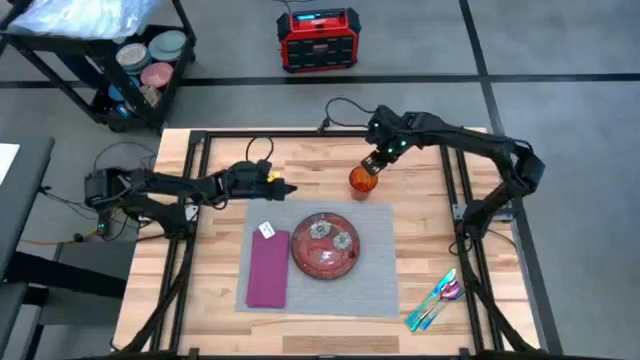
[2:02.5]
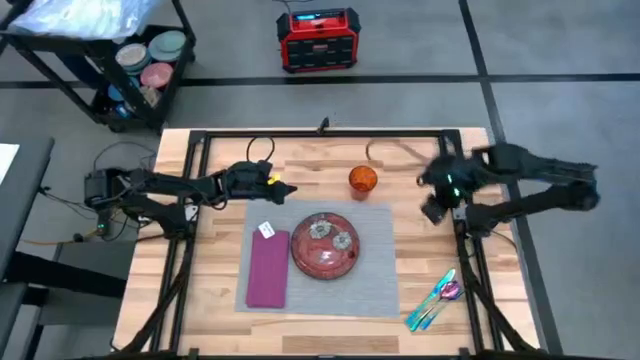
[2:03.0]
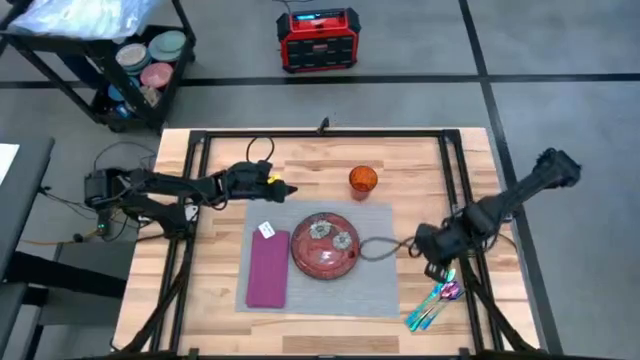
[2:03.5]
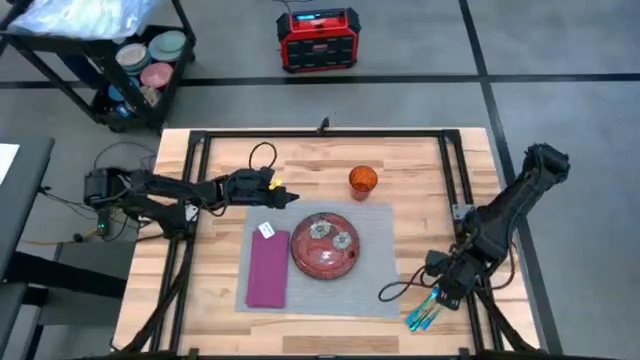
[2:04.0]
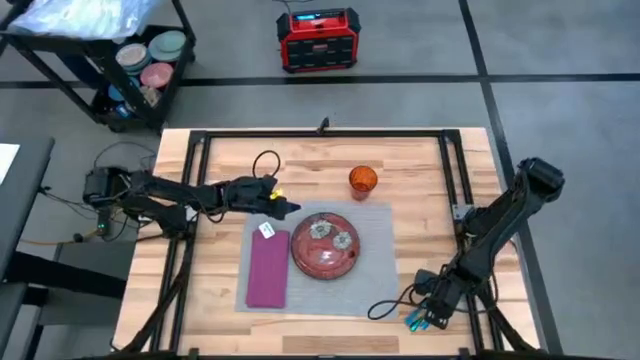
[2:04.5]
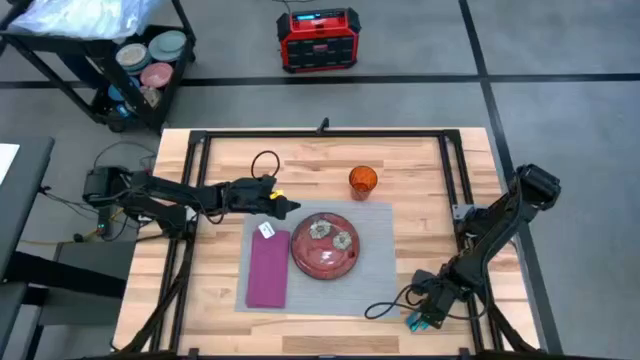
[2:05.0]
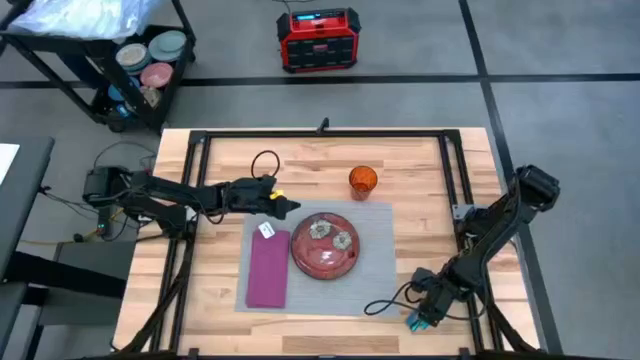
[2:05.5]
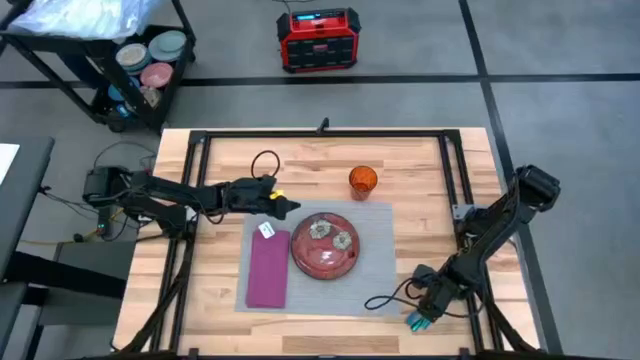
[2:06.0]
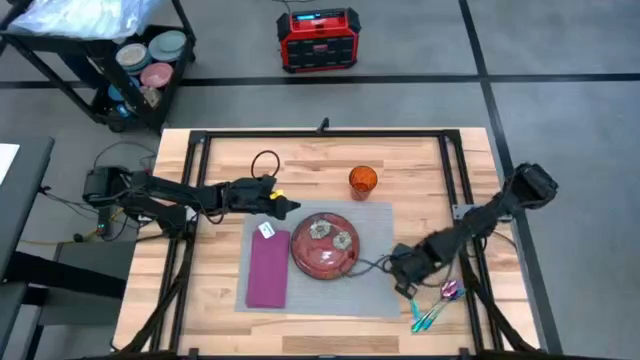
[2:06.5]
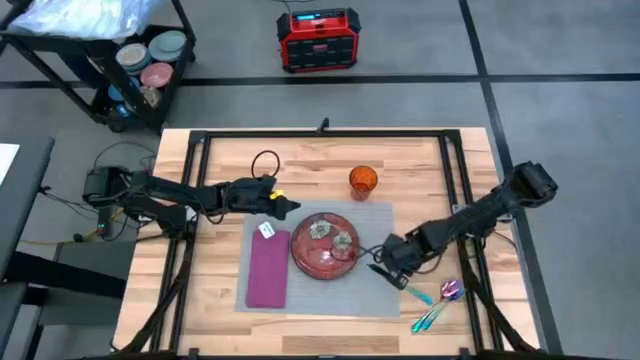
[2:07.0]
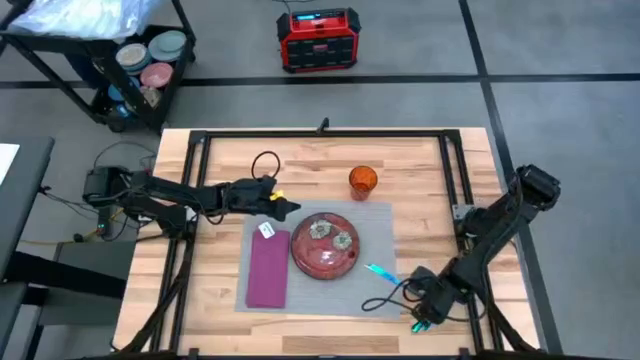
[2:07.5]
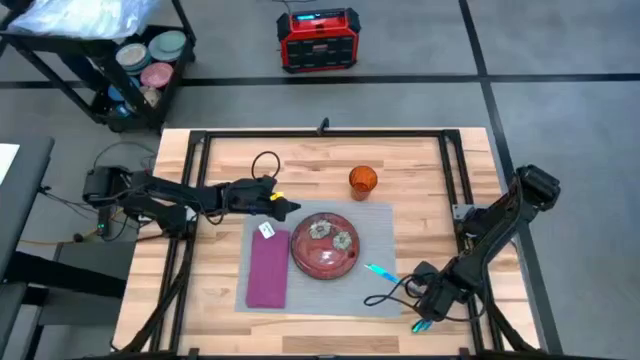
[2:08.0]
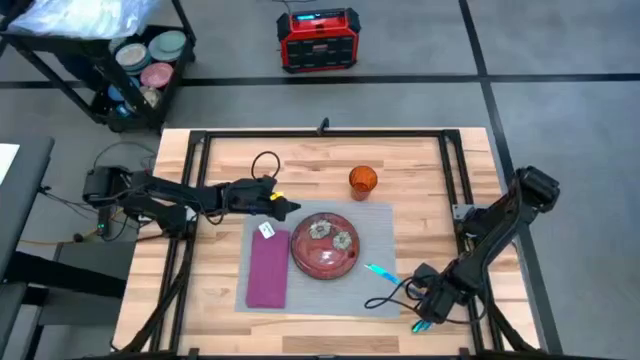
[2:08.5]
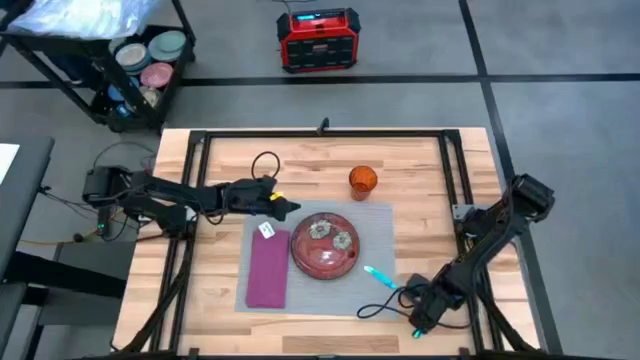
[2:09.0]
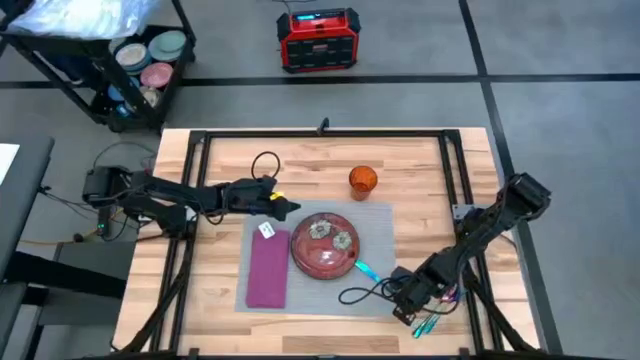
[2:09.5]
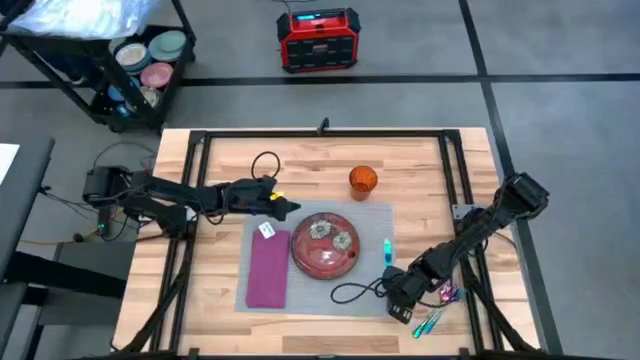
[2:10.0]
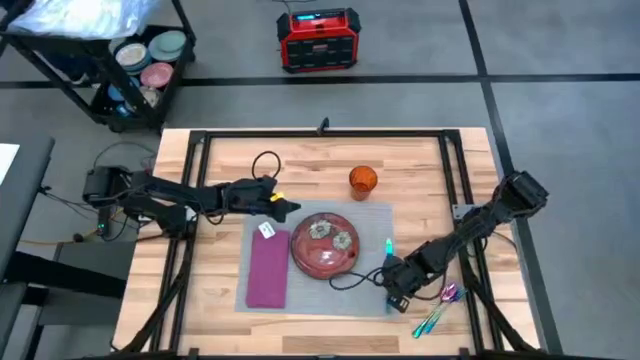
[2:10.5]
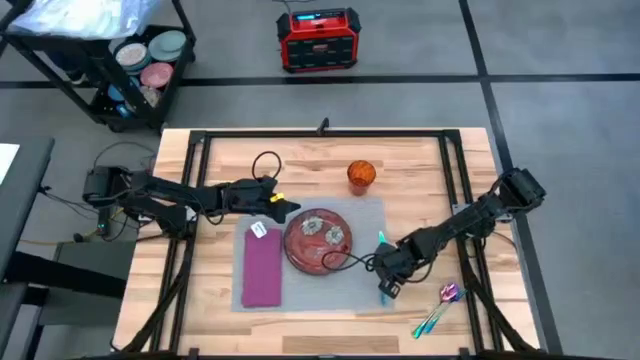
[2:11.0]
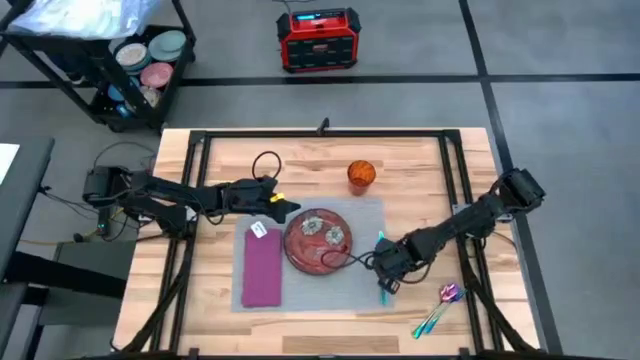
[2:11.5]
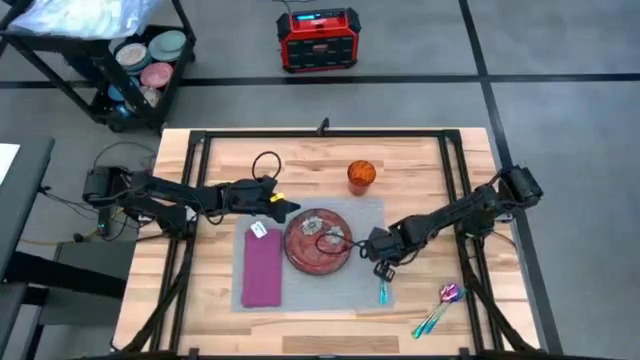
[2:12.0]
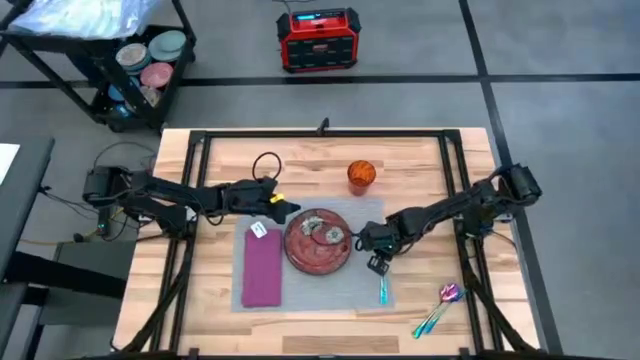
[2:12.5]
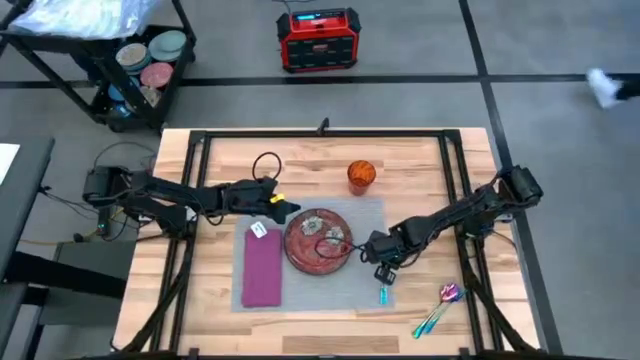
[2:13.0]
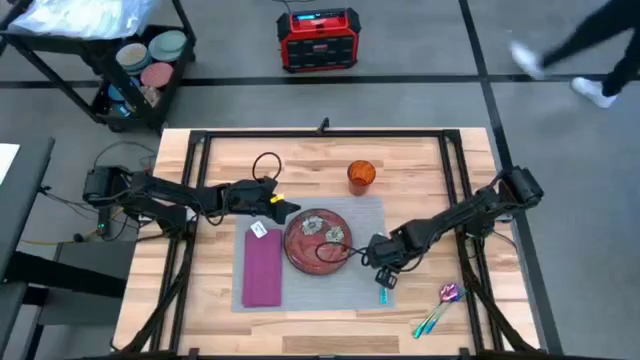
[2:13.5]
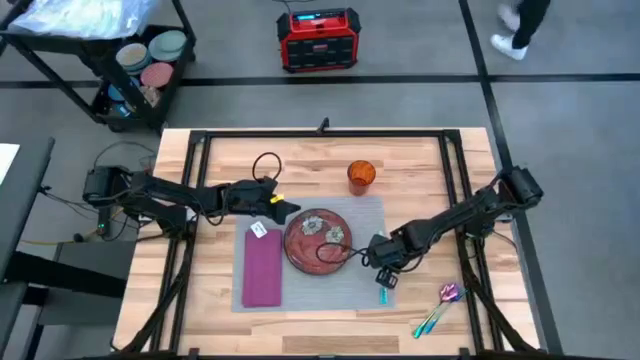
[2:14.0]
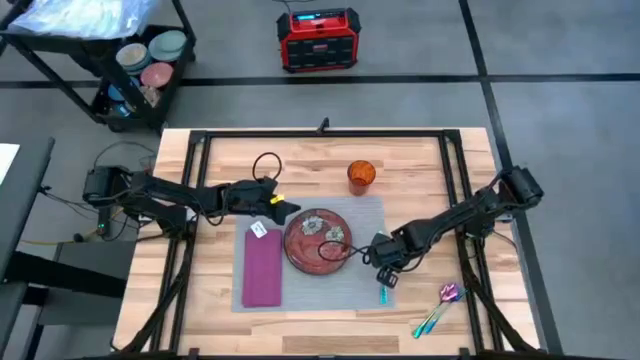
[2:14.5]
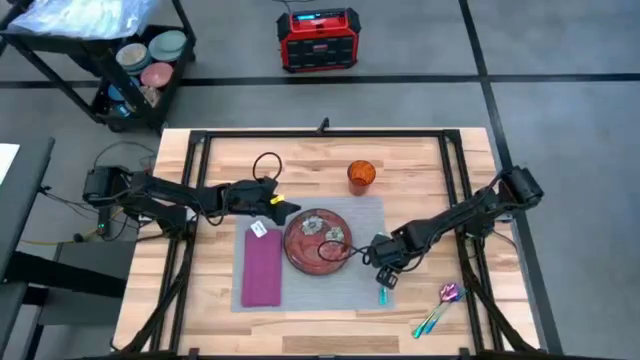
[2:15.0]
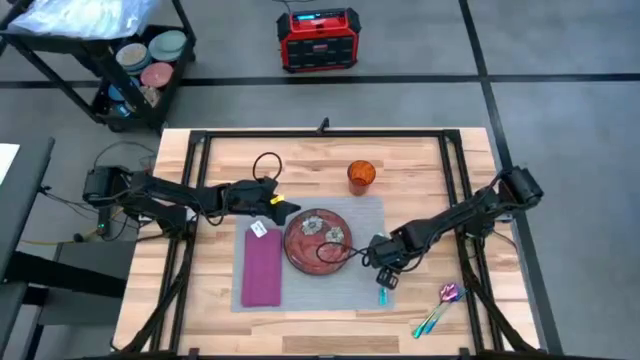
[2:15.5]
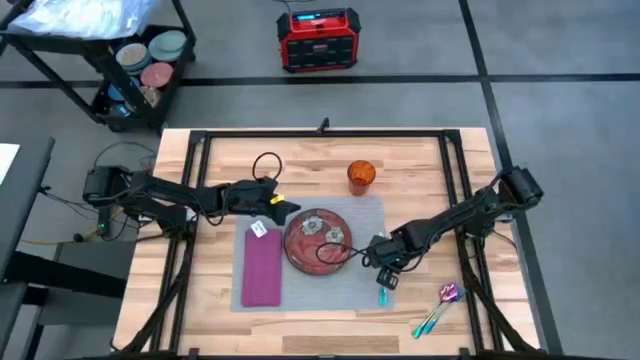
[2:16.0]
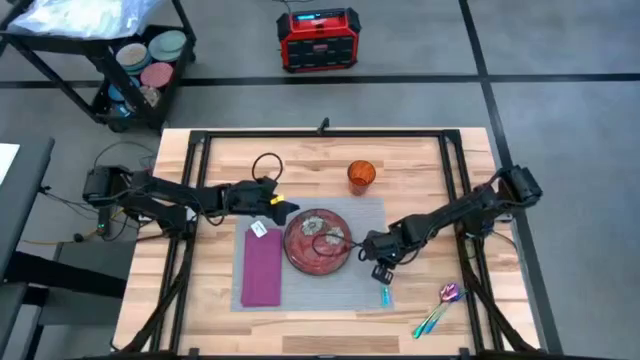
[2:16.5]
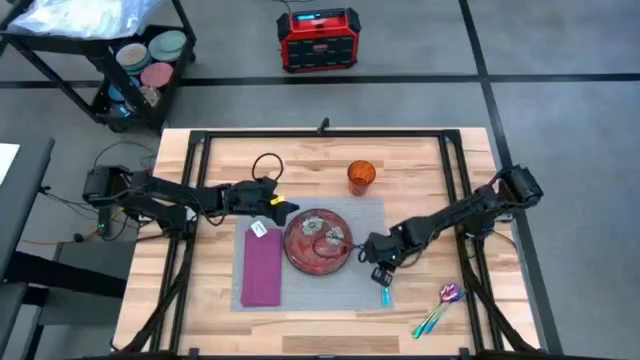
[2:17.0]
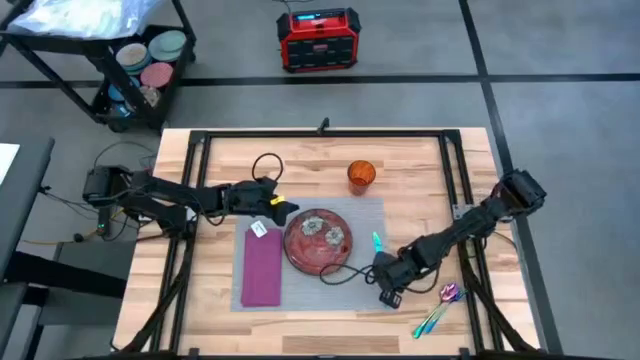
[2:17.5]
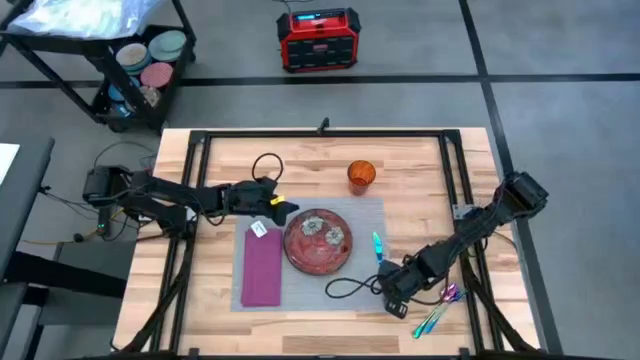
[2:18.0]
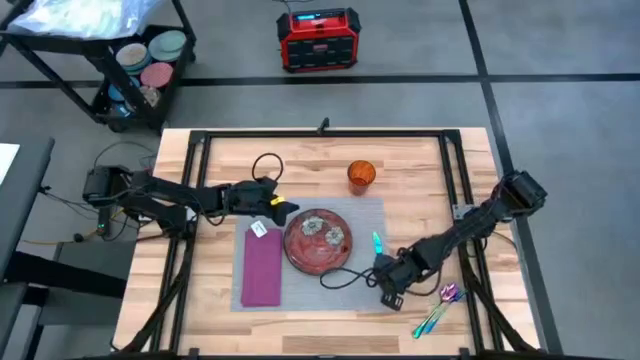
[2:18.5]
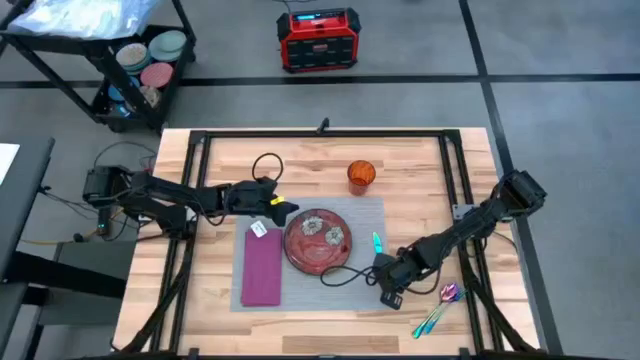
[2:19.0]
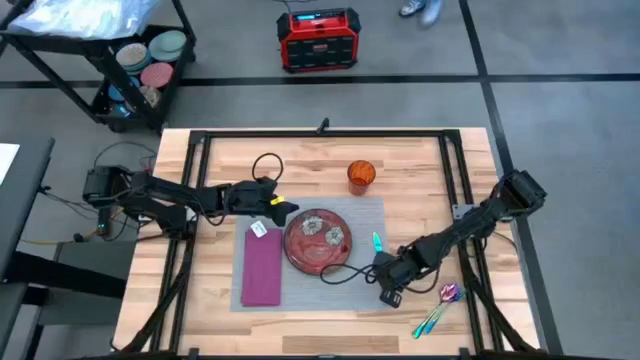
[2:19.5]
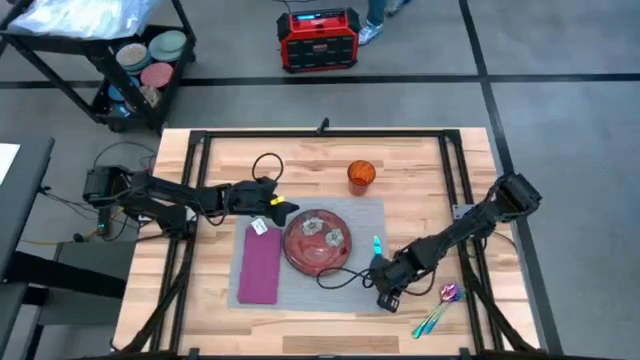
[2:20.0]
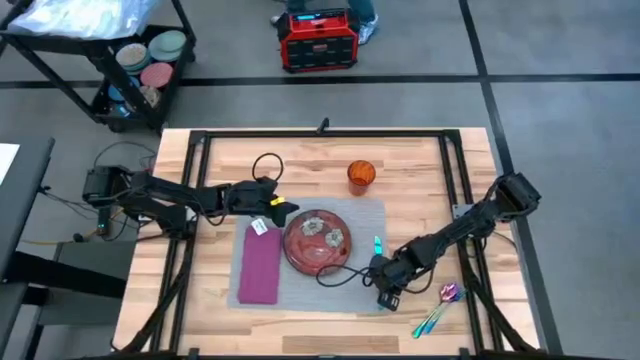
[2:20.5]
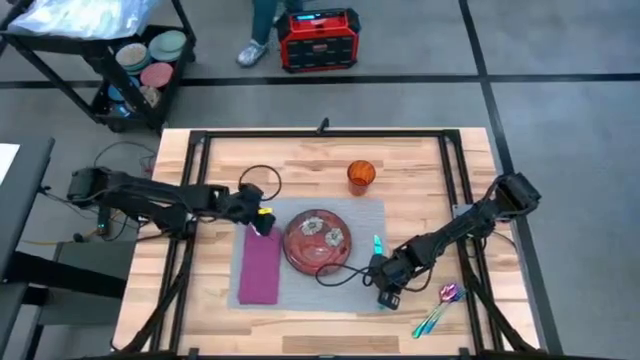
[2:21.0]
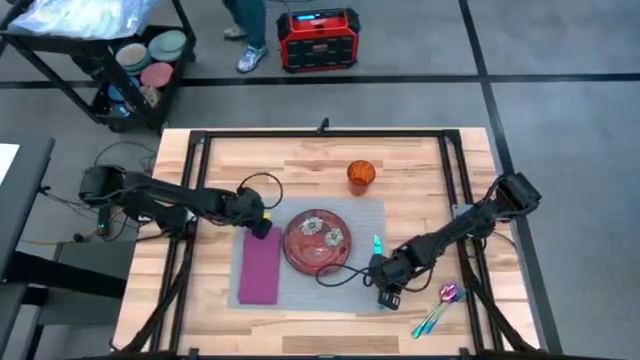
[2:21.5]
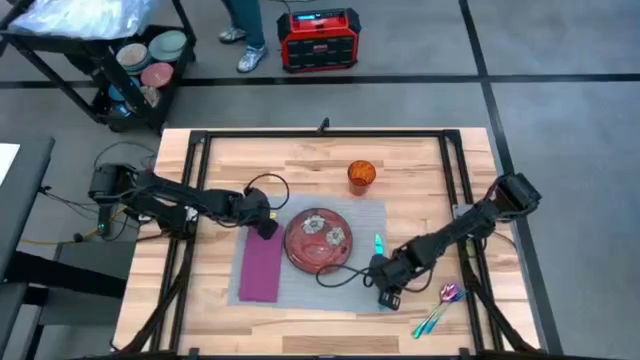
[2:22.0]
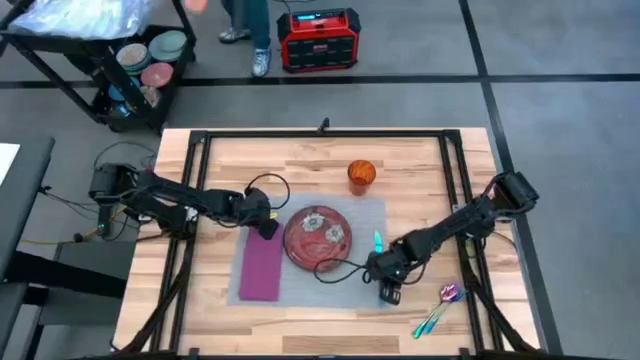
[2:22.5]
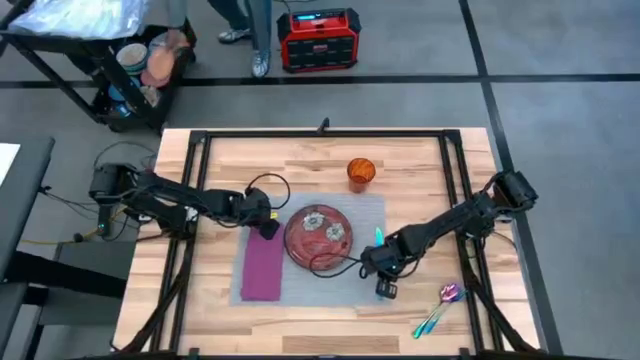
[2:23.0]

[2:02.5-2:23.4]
Task: Set table place
Adjust the blue knife on the table mat

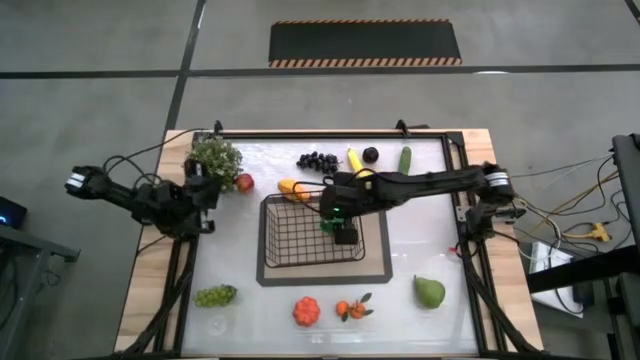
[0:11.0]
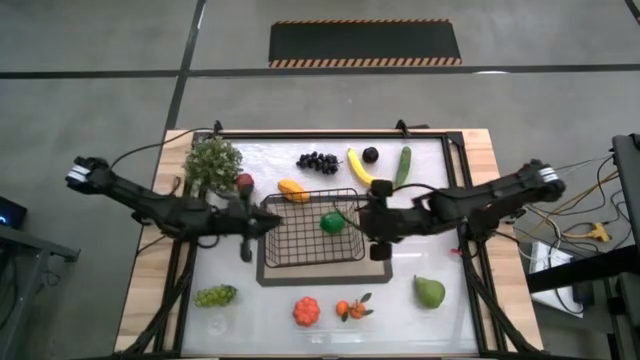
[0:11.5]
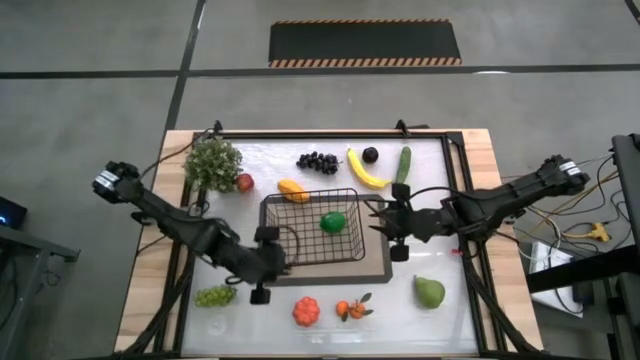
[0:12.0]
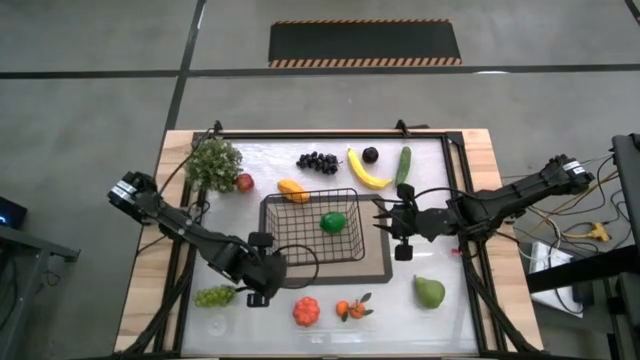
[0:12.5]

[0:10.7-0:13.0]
Task: Build produce basket
Adjust the black wire basket
